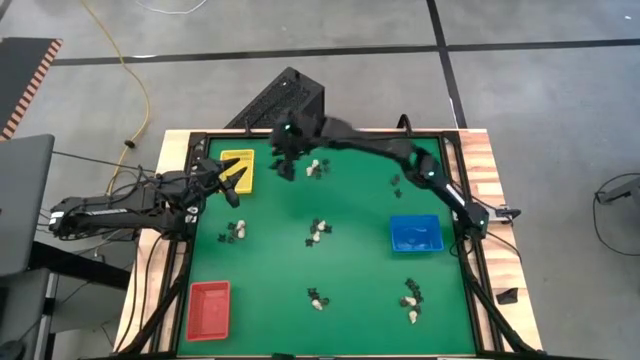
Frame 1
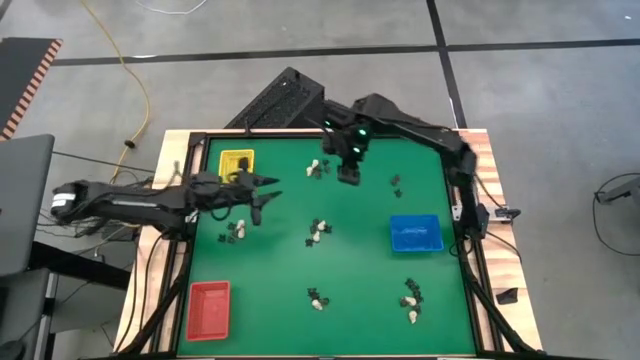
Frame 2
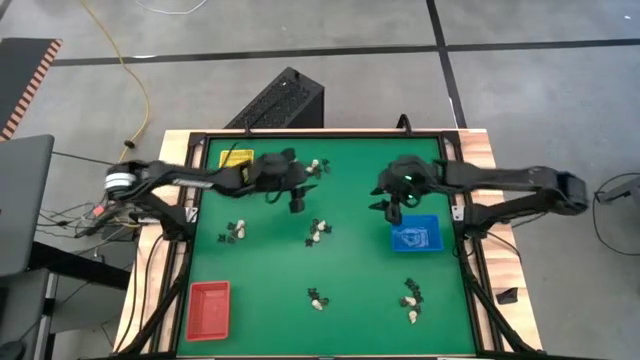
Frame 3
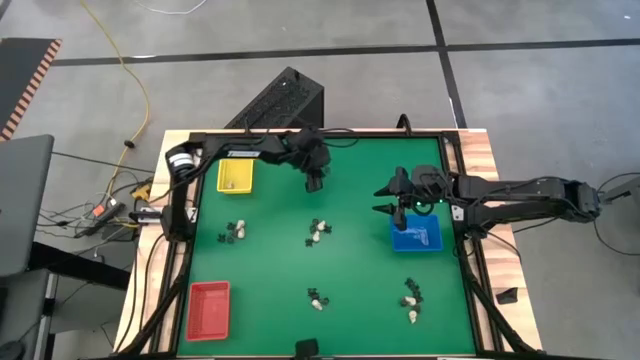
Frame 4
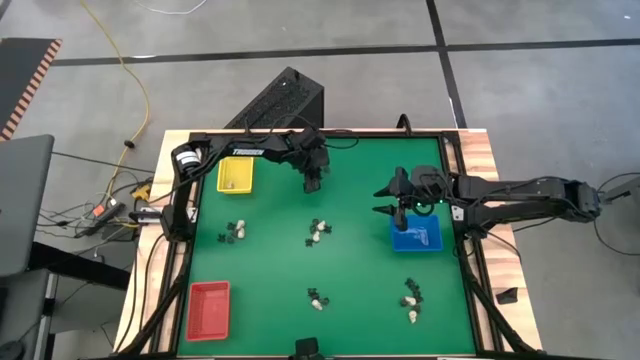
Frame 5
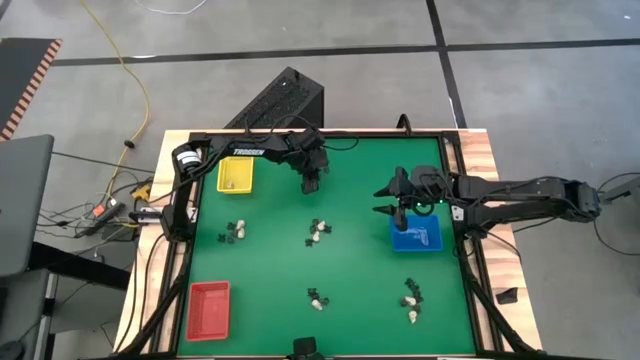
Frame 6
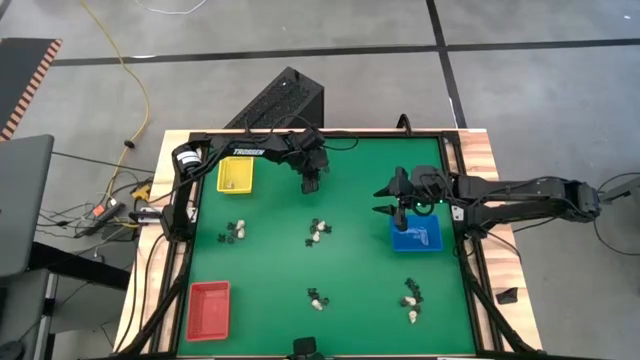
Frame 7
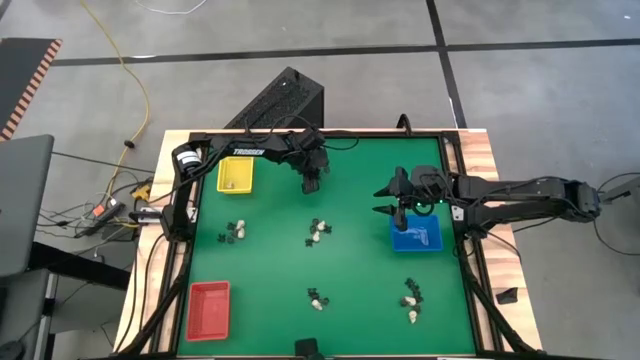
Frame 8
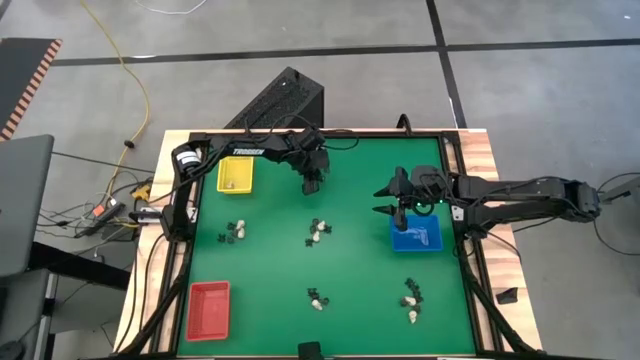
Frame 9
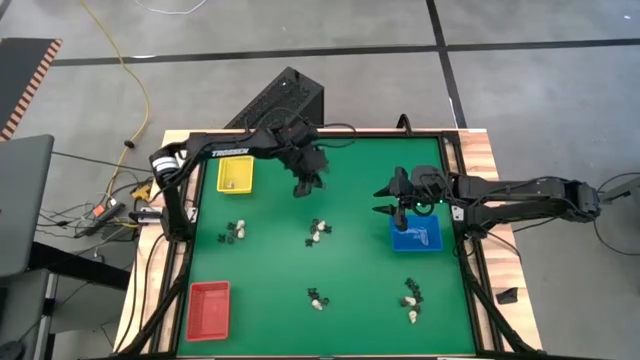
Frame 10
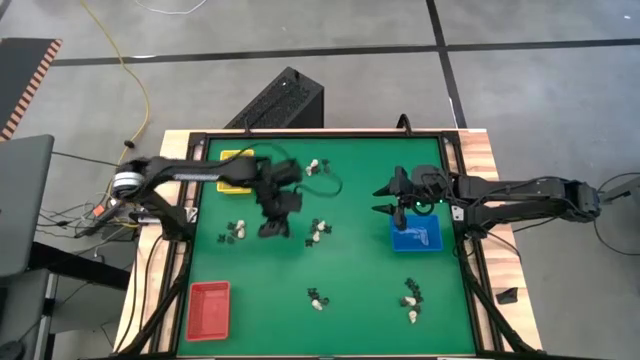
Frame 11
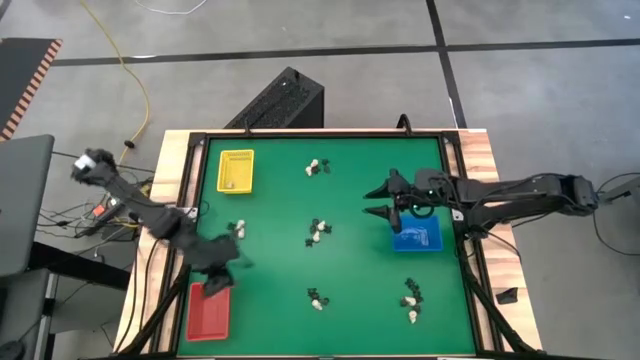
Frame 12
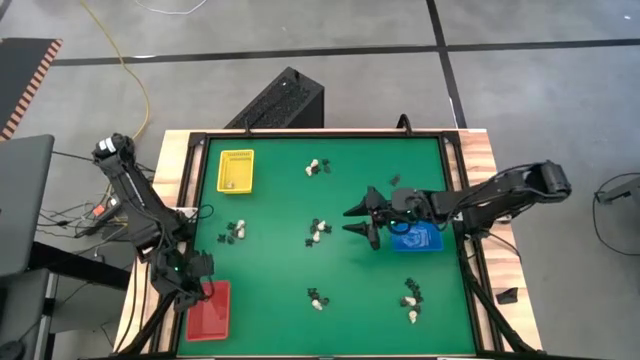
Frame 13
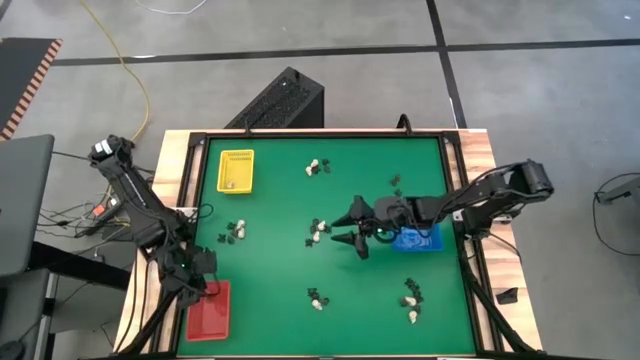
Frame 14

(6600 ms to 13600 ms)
Task: Sort Halloween decoration
Put the black skull toy into the red bin

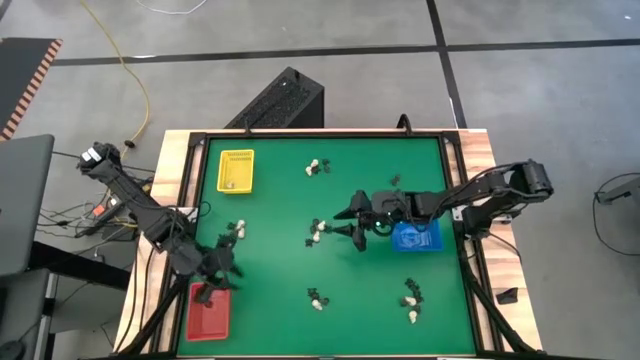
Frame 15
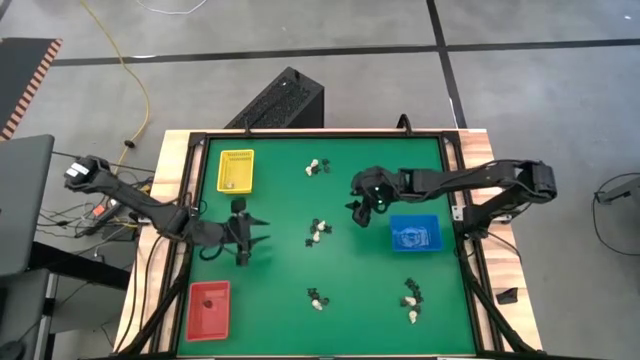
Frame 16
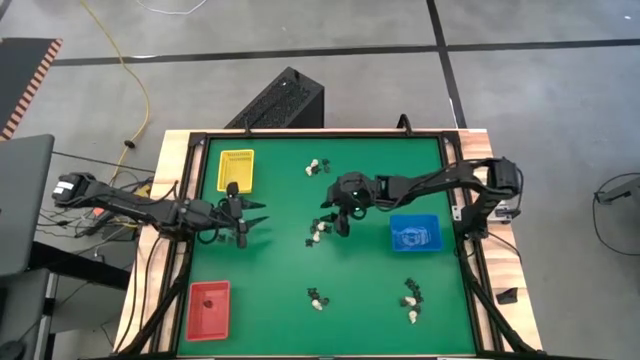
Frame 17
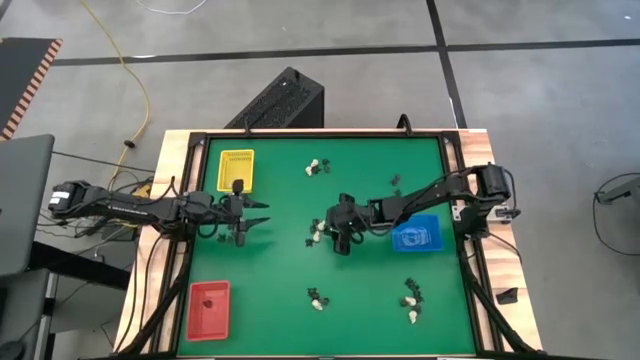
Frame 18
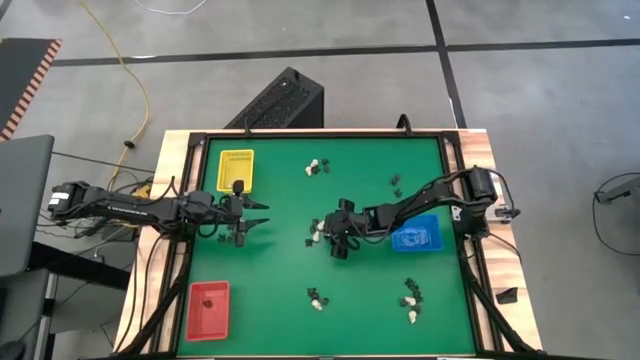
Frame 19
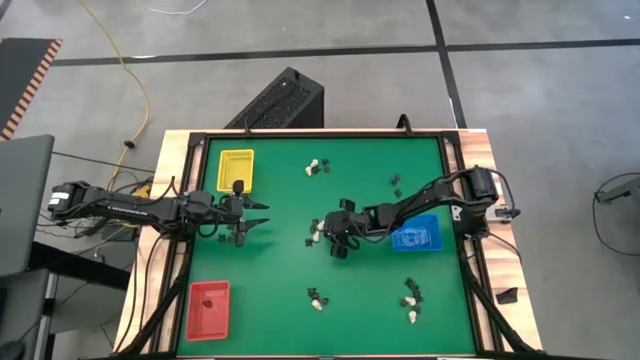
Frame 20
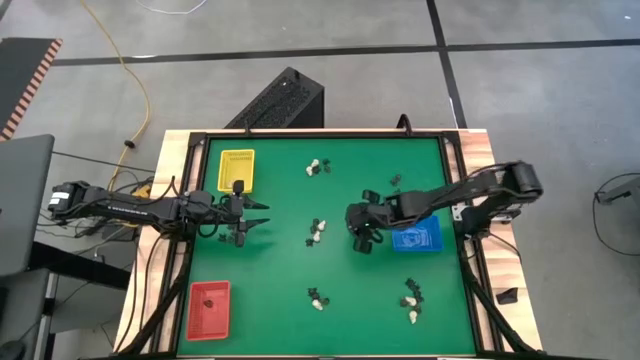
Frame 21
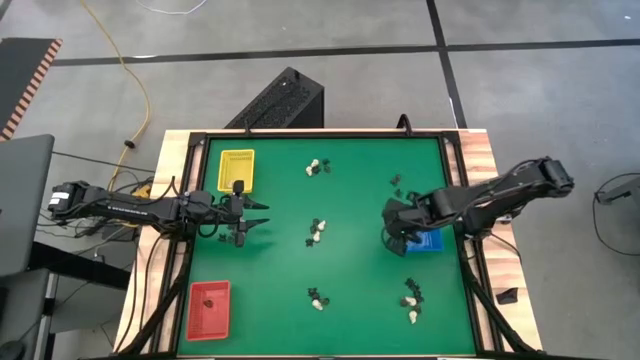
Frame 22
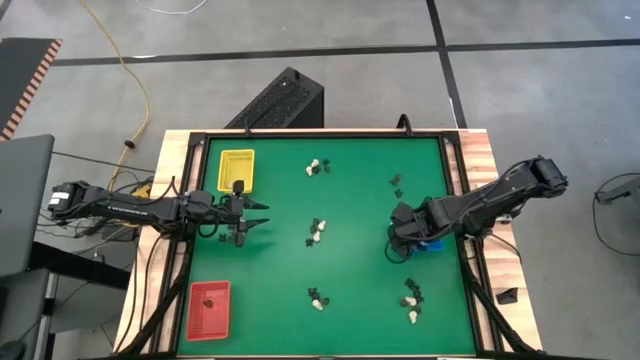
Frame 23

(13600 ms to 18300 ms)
Put the black spider toy into the blue bin

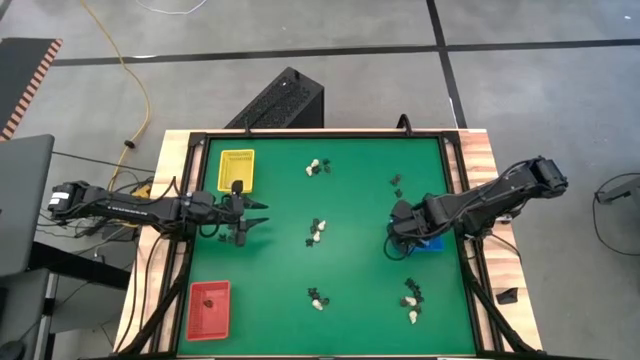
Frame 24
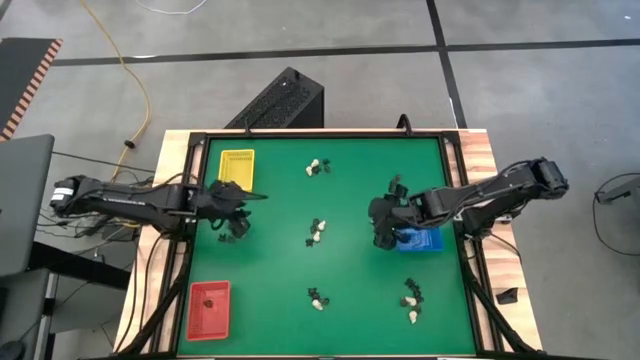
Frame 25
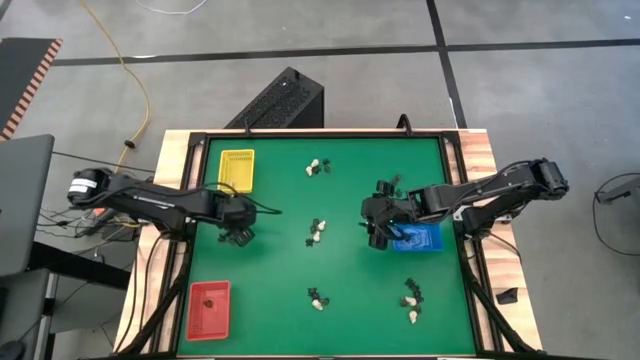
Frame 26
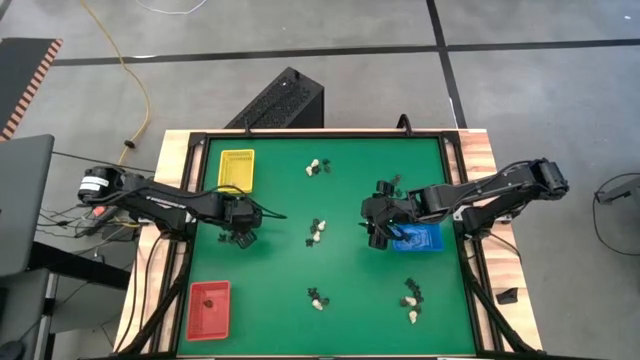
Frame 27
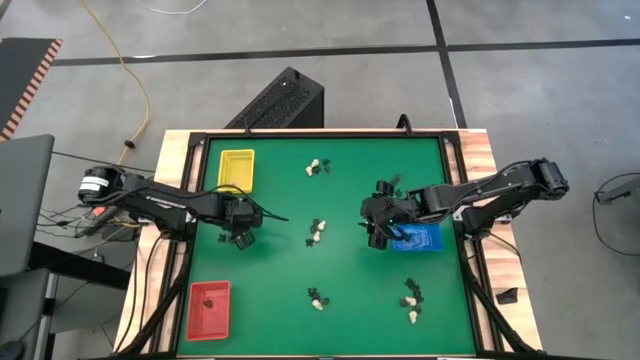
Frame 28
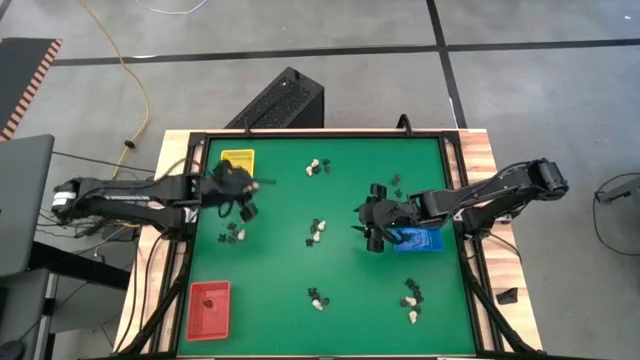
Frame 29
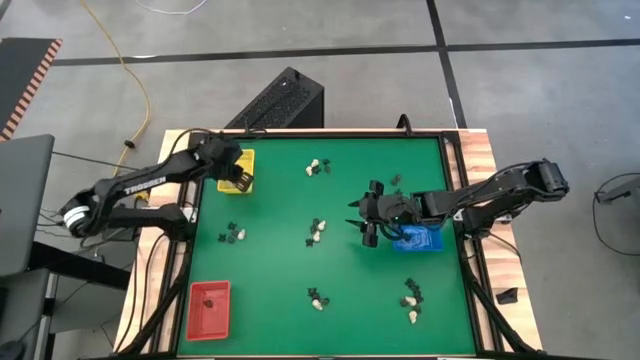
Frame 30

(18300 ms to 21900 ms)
Put the white skull toy into the yellow bin

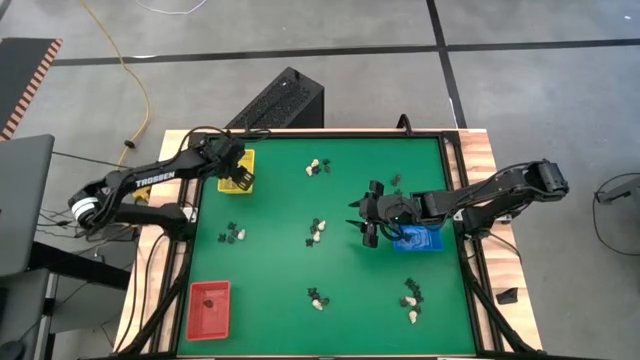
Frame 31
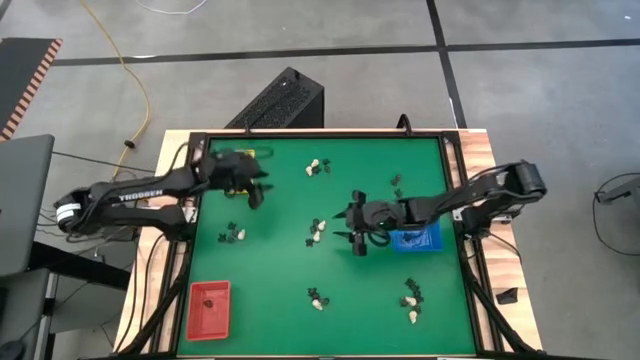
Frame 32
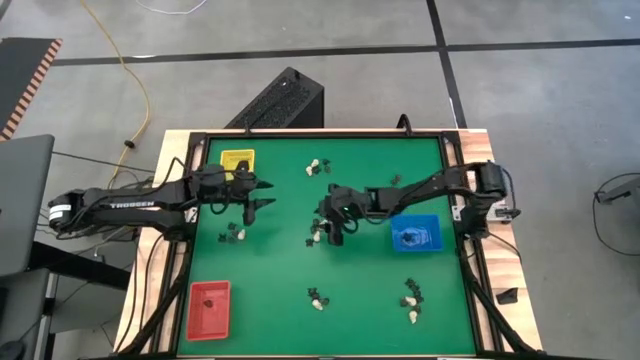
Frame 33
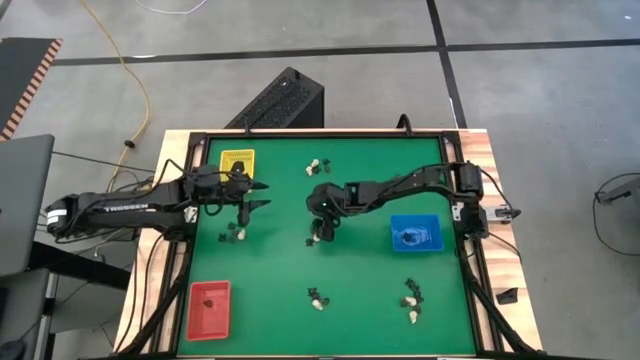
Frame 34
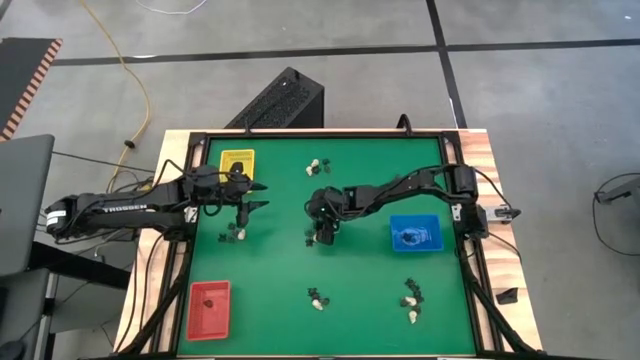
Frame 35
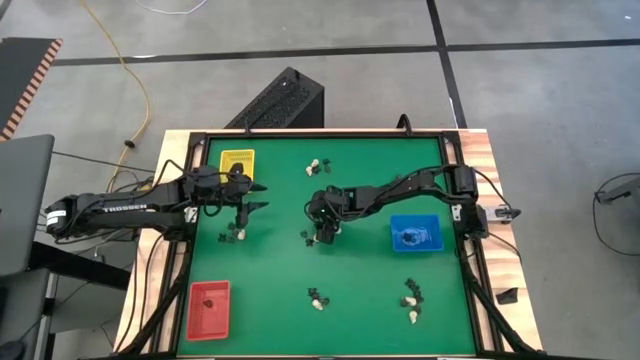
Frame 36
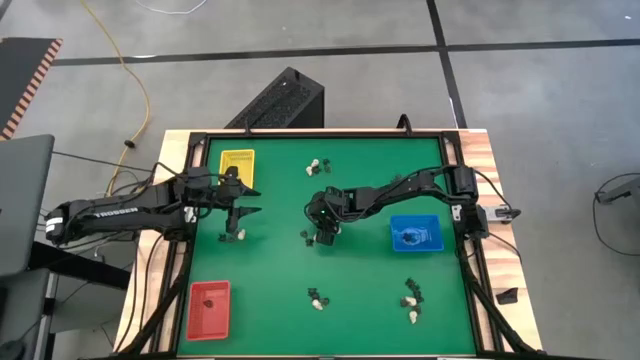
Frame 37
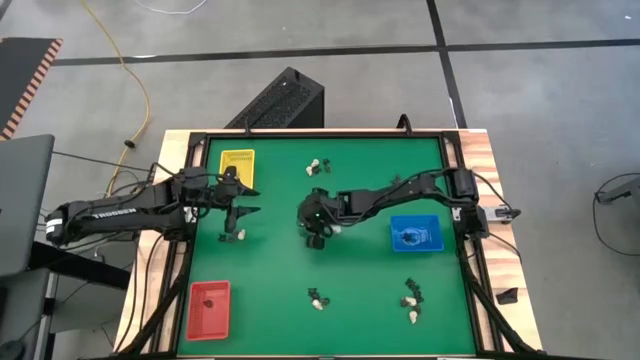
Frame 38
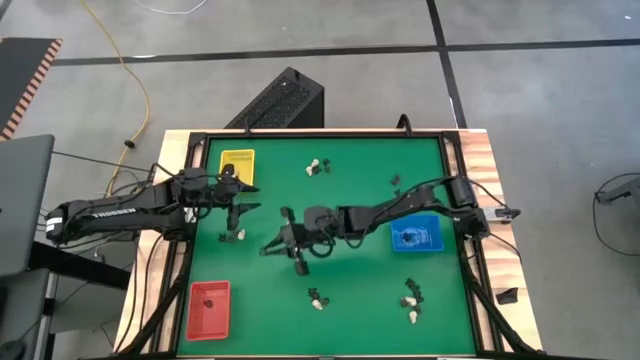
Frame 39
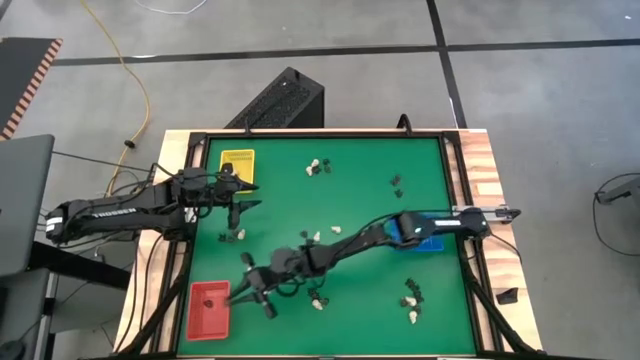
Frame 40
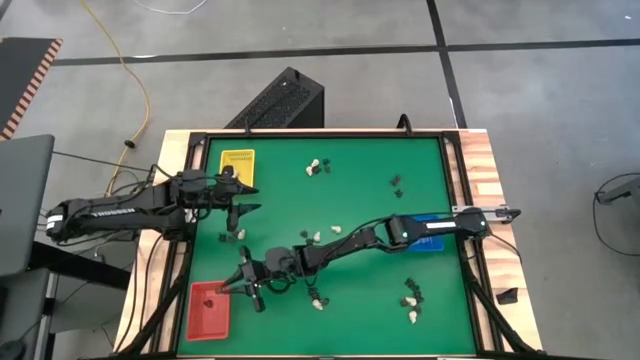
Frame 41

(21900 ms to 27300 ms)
Put the black skull toy into the red bin
